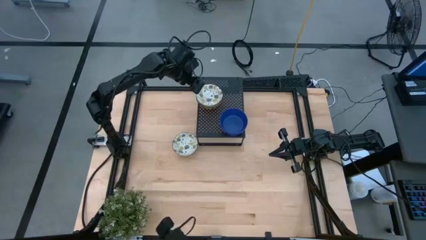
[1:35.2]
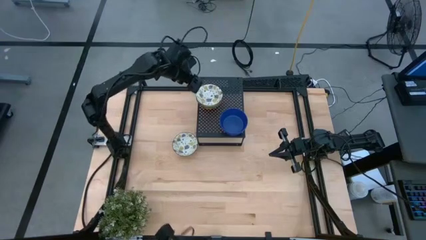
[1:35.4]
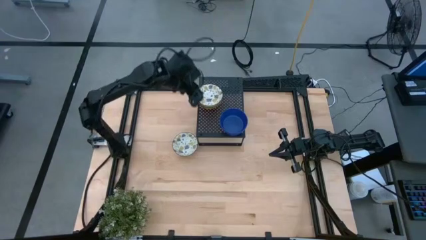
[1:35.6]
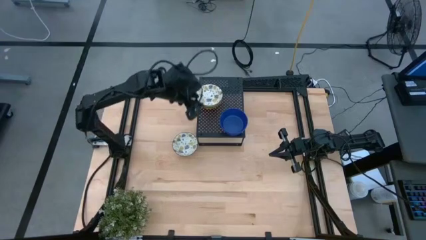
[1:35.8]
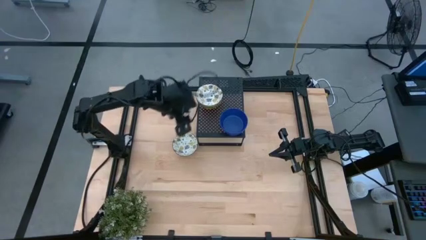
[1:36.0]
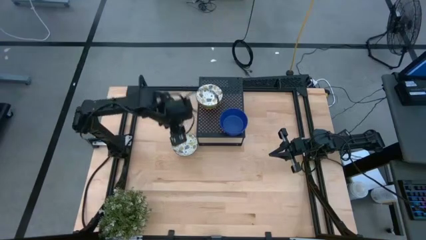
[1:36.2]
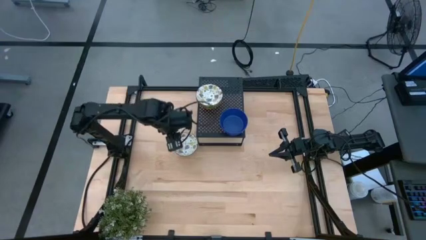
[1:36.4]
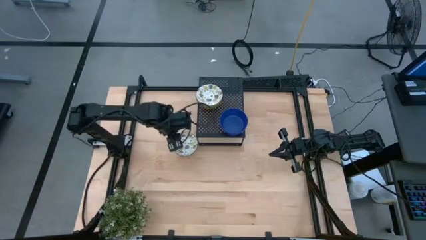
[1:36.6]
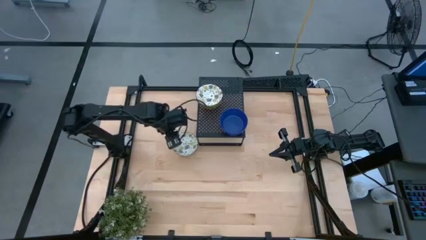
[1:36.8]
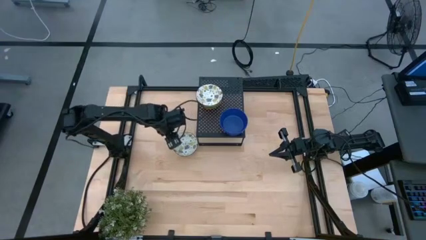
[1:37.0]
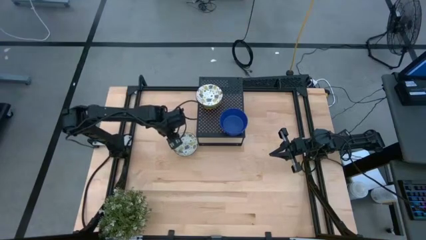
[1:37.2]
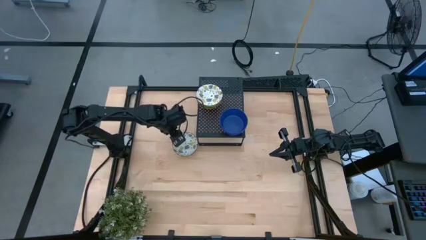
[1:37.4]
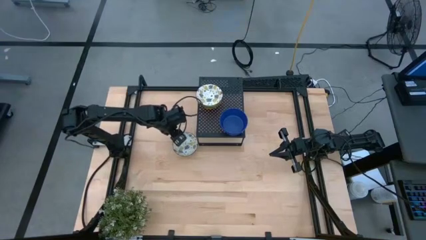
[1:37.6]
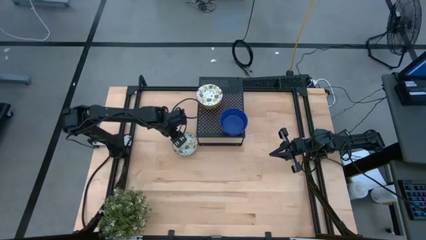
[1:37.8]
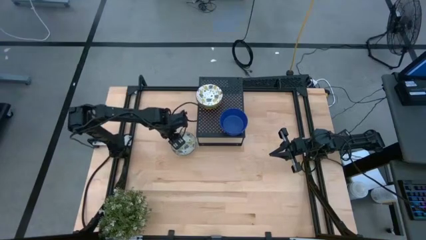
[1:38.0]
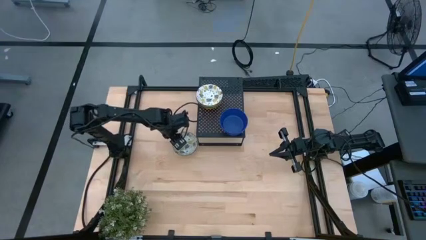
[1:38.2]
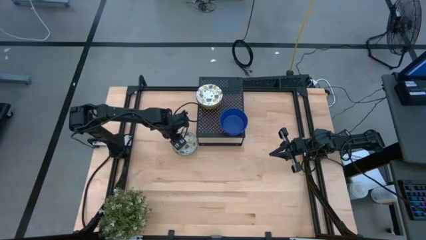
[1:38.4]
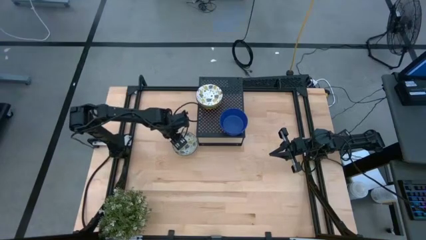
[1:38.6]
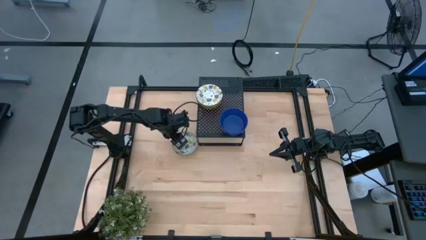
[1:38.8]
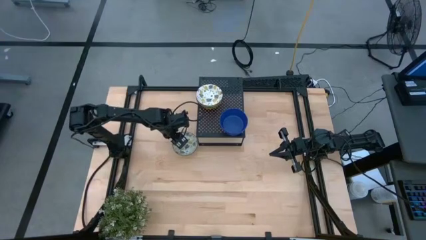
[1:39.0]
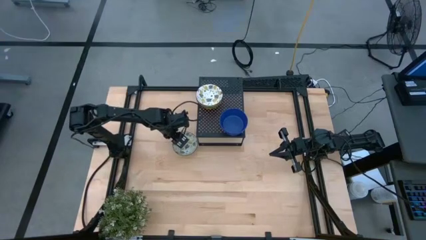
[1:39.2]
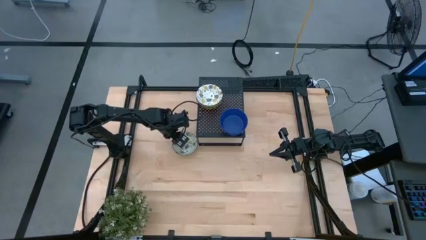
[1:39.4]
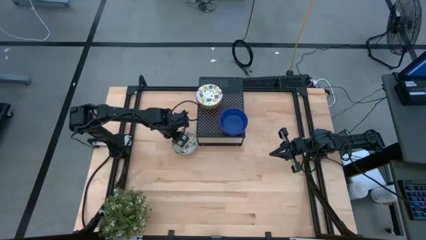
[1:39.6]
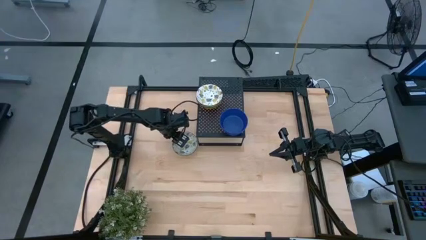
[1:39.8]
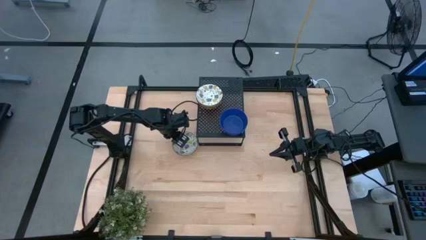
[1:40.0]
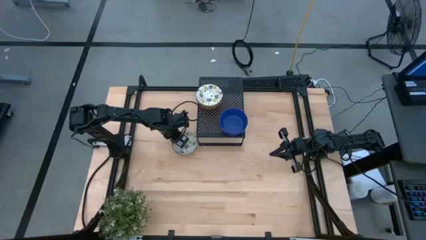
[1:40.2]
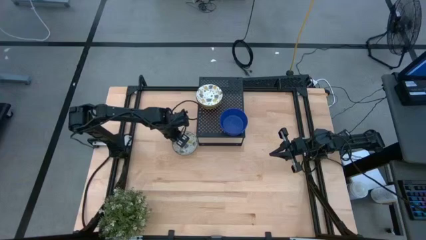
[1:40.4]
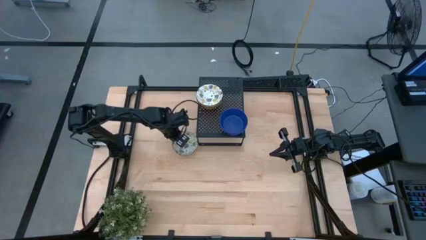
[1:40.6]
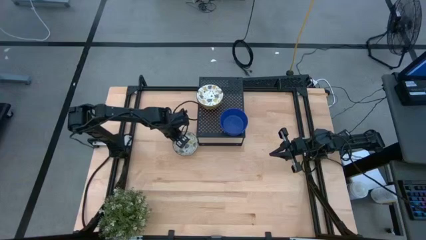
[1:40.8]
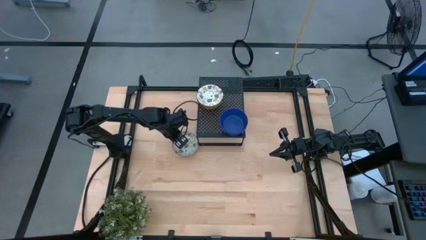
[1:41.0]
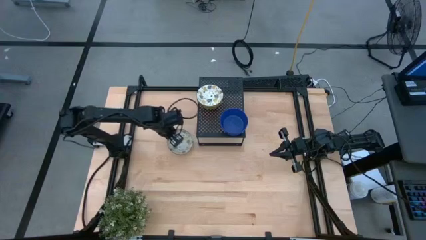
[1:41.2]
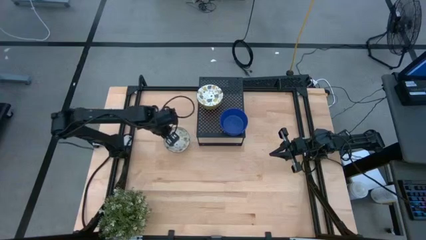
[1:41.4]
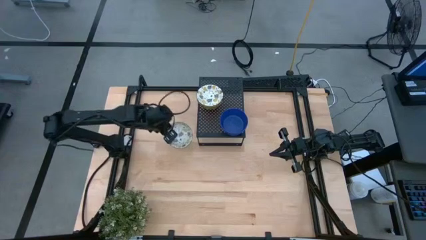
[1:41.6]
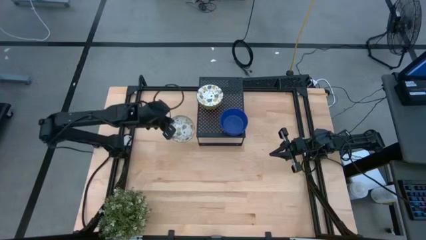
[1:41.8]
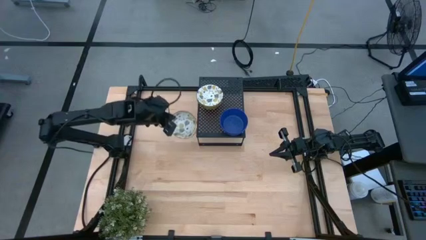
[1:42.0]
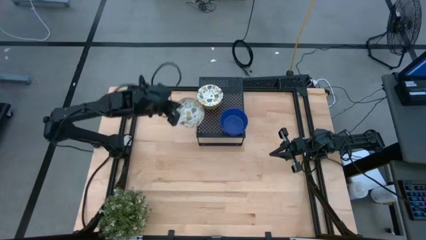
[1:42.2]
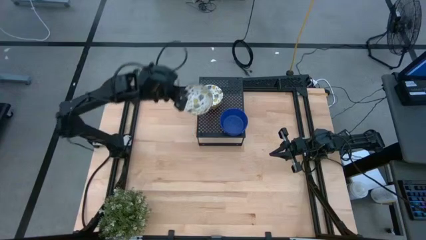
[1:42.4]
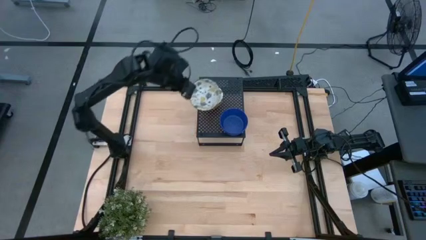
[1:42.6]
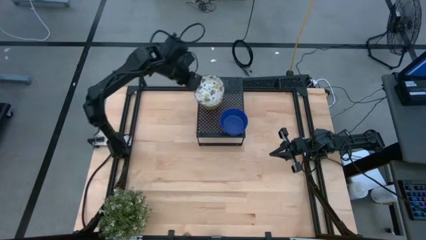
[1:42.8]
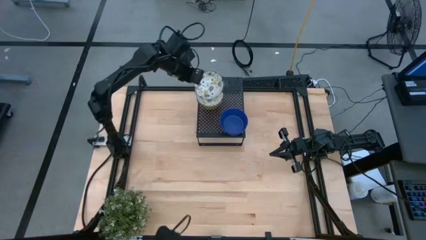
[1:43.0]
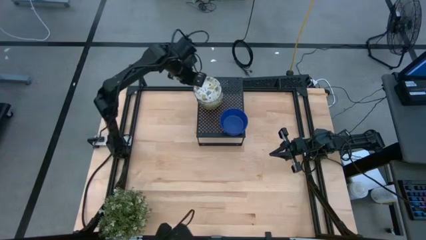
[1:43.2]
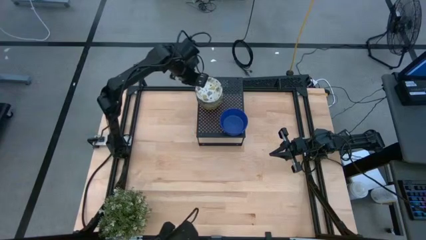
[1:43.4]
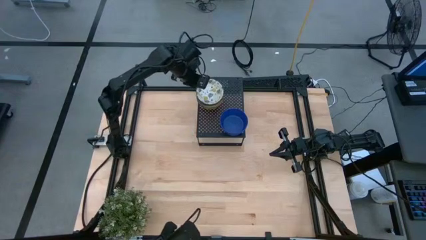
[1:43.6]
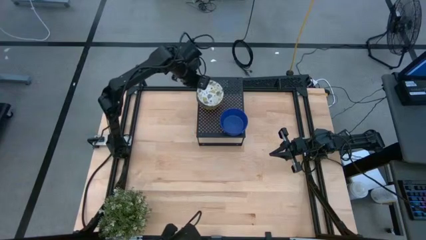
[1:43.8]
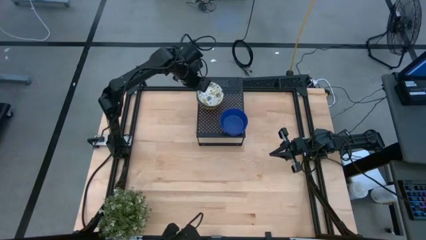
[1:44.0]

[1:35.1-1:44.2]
Task: Pick & Place Mini bowls
Stack the white bowl on the white bowls on the shelf

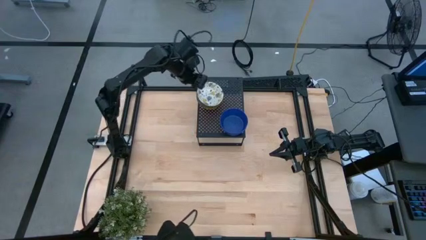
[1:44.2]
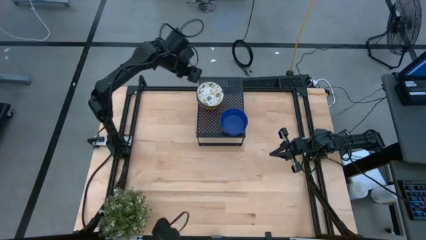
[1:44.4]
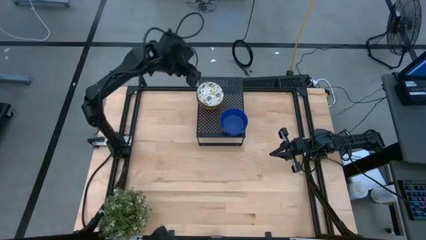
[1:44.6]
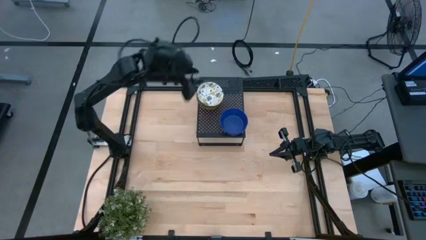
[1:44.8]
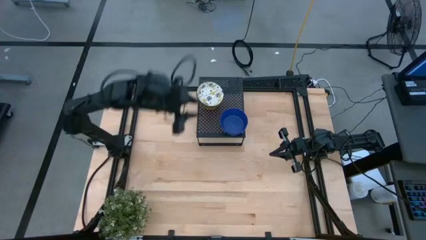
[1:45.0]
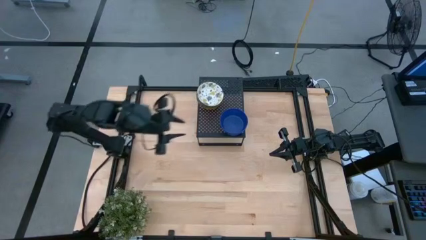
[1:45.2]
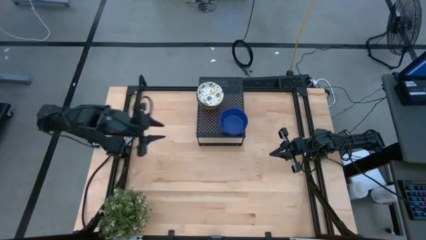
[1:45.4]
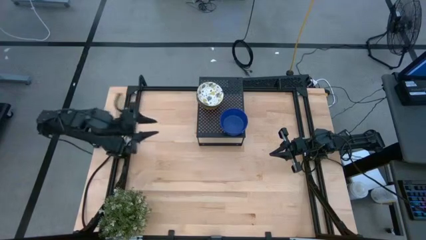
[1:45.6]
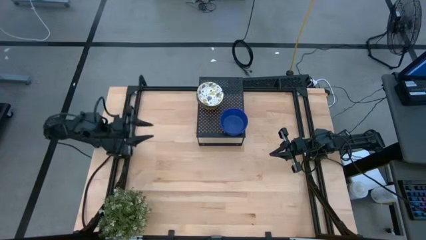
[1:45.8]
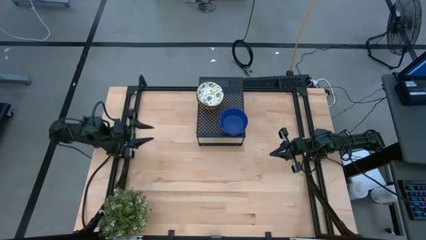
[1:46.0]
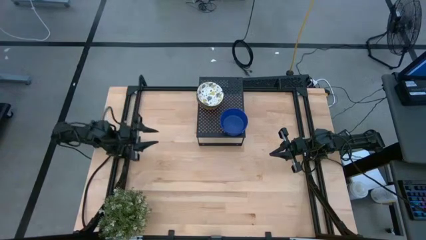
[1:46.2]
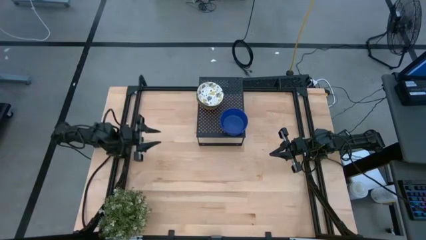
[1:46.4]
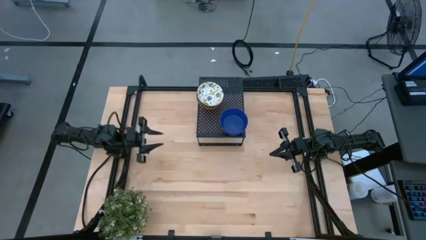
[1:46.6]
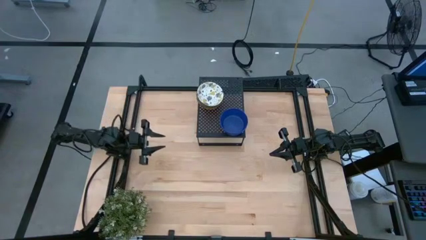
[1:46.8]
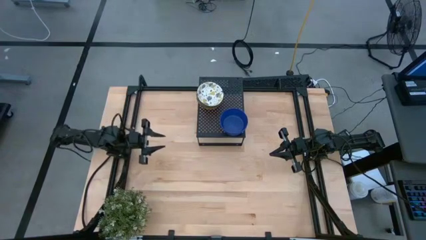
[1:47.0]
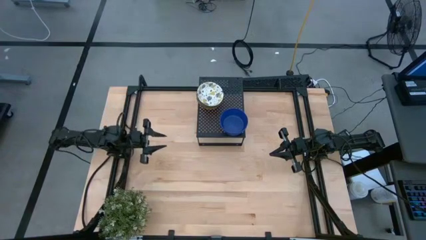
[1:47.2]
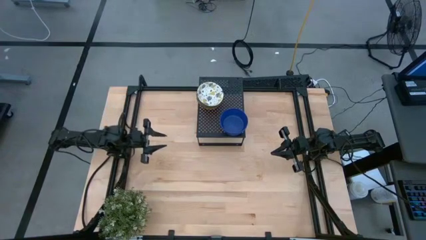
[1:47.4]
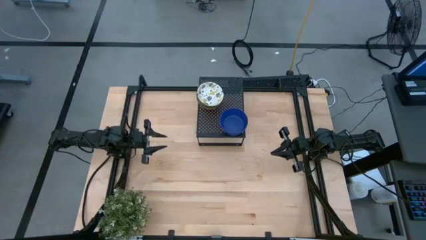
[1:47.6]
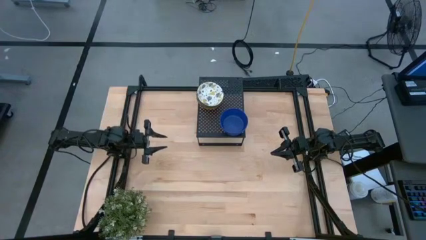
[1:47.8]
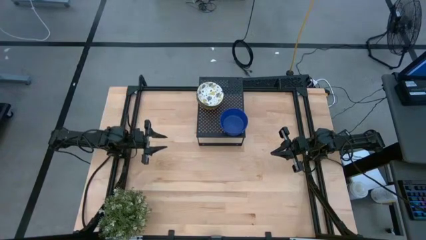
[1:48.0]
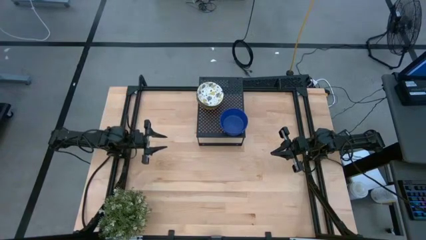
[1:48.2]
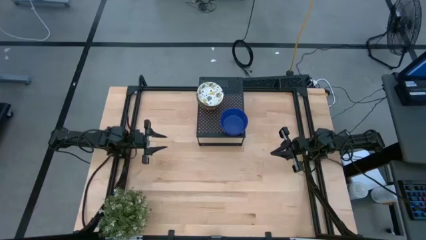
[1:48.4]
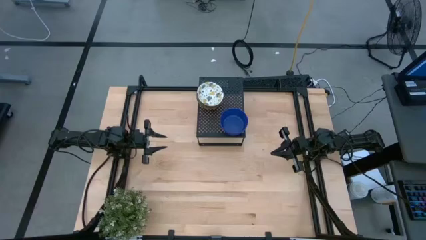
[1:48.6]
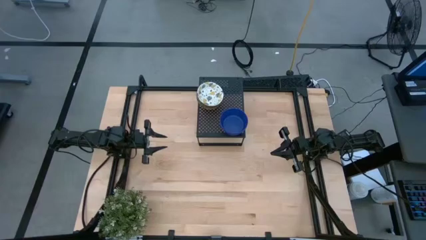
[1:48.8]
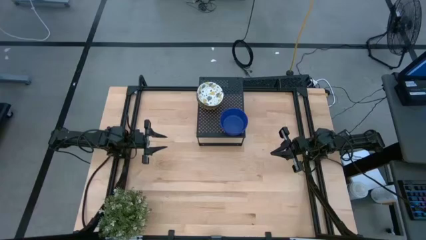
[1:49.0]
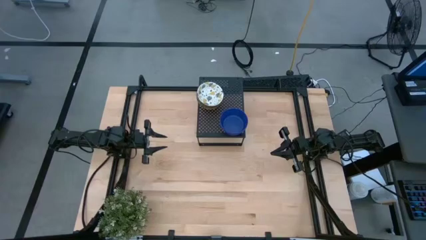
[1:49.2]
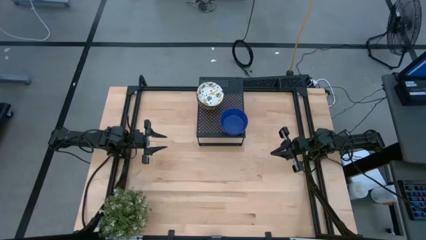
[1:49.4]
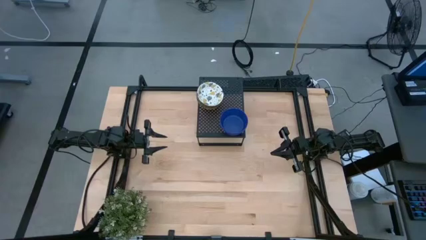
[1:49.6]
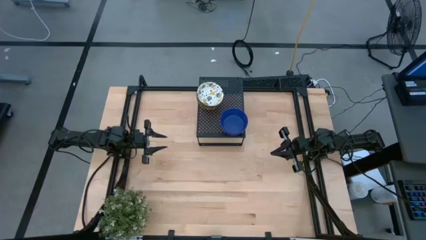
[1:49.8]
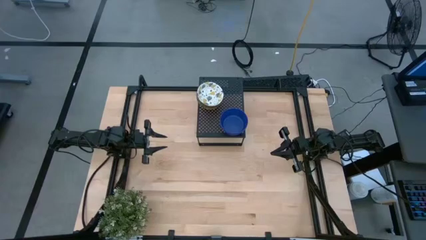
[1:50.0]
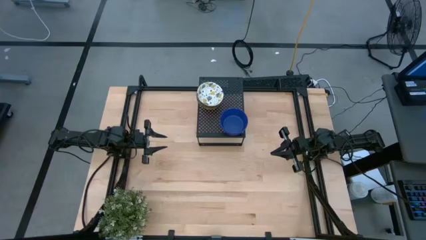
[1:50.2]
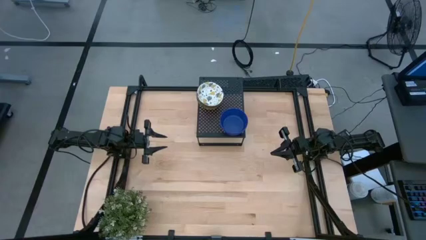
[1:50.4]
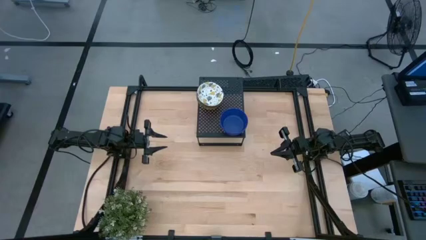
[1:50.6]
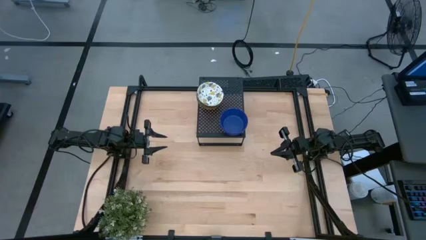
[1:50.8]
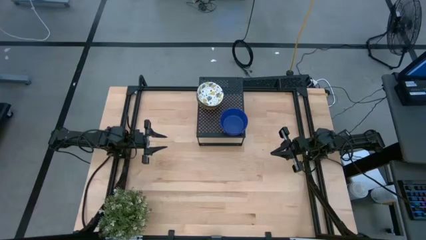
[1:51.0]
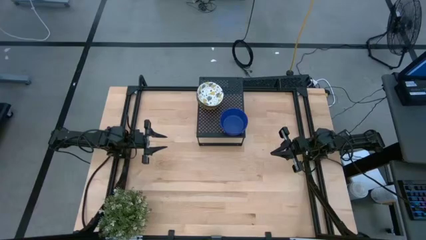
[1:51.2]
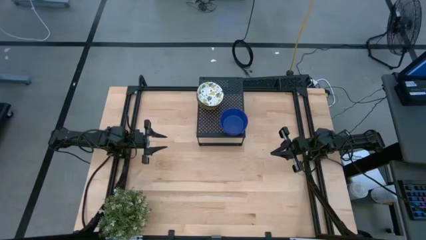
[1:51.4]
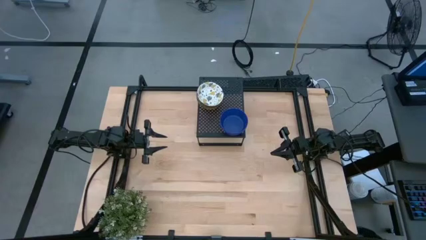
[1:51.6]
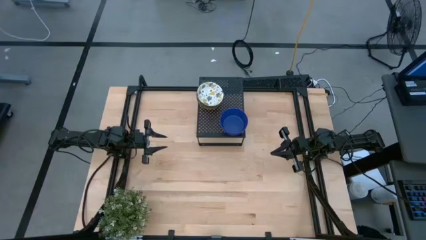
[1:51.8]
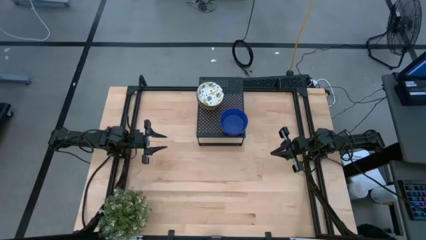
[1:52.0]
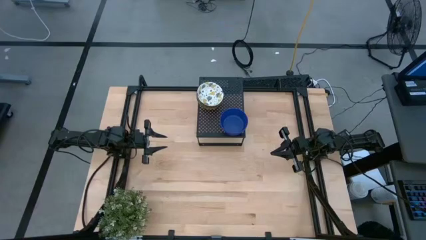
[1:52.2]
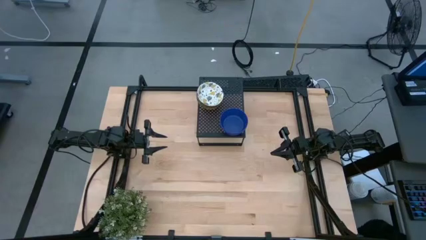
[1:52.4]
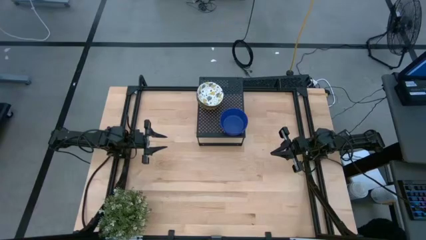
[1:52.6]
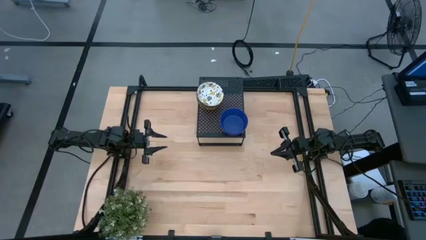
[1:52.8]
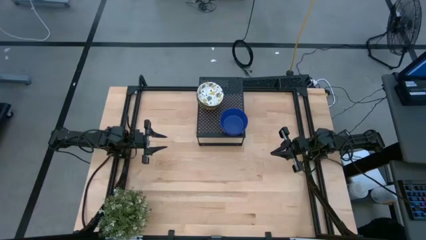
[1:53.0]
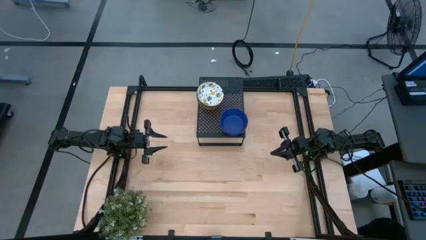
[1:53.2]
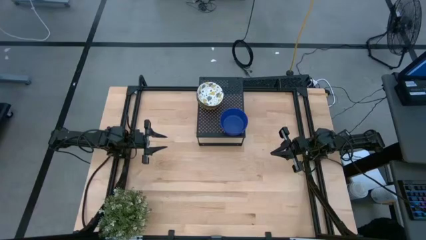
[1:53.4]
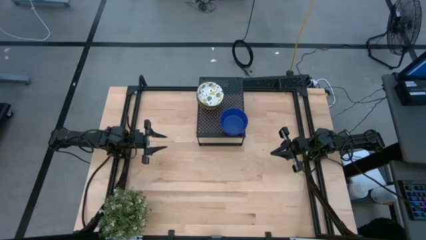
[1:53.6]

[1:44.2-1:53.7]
Return to Home Position
